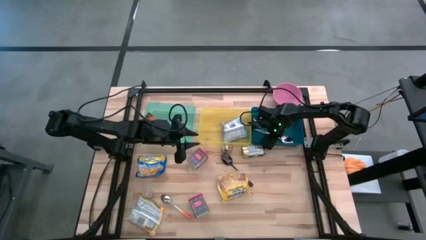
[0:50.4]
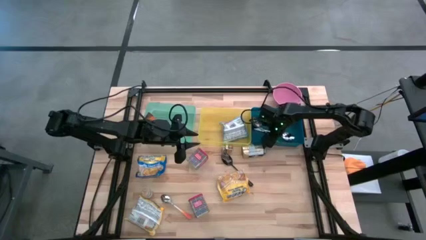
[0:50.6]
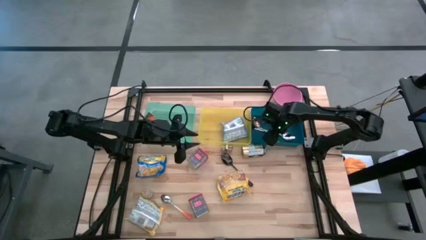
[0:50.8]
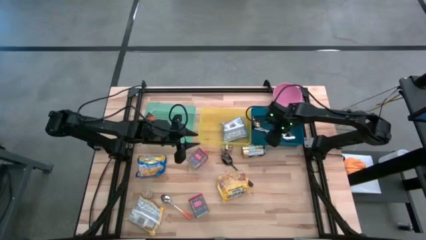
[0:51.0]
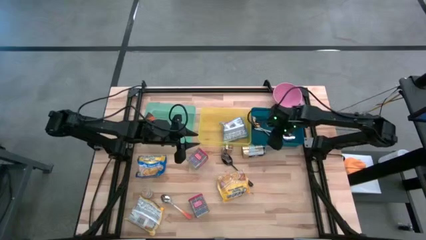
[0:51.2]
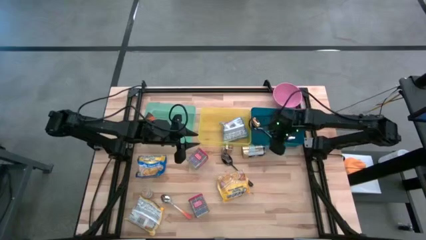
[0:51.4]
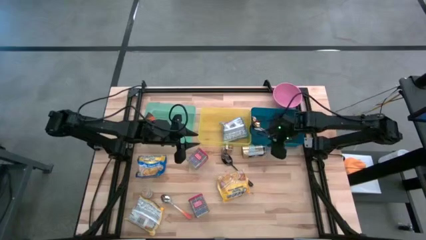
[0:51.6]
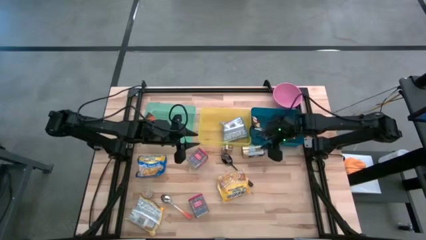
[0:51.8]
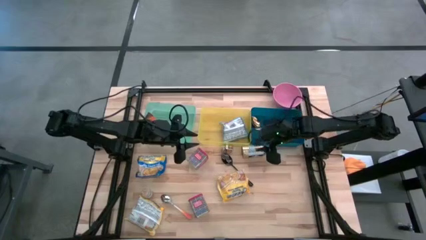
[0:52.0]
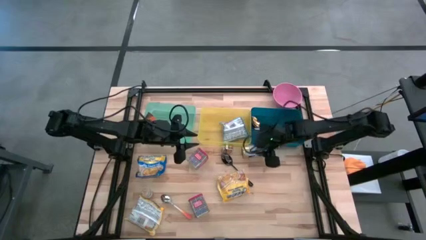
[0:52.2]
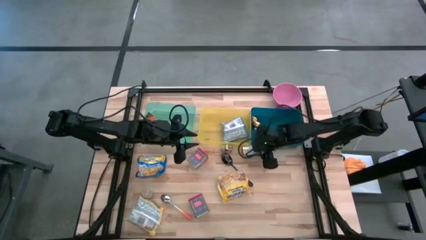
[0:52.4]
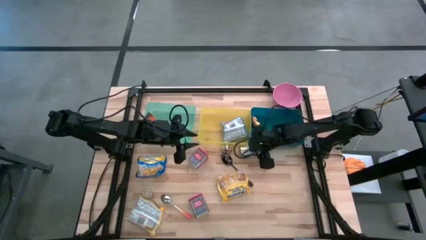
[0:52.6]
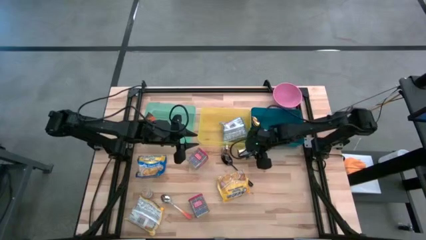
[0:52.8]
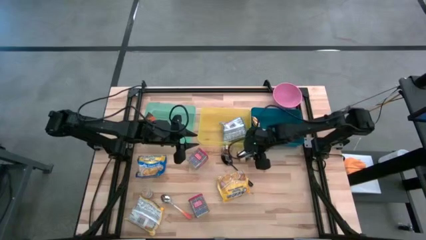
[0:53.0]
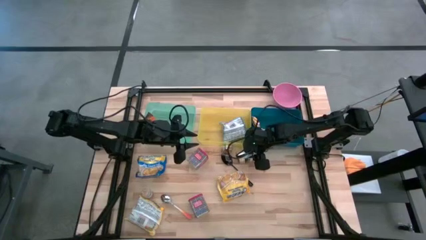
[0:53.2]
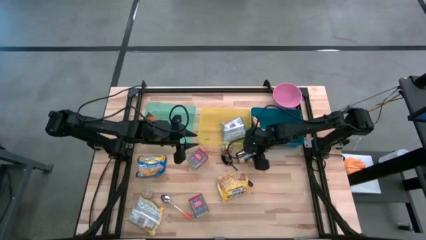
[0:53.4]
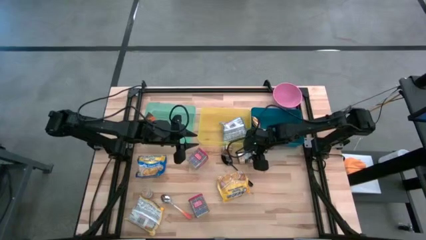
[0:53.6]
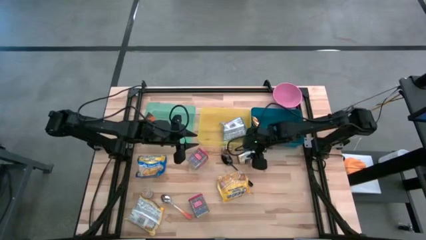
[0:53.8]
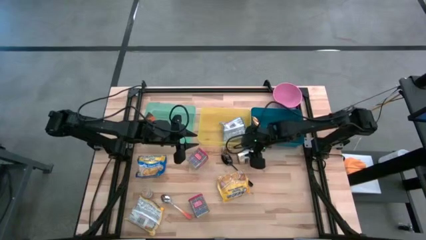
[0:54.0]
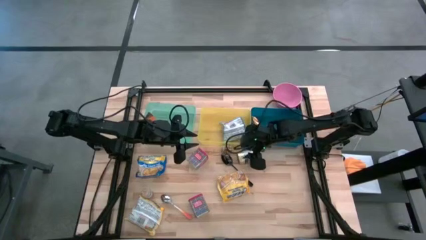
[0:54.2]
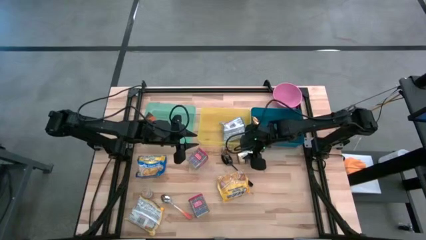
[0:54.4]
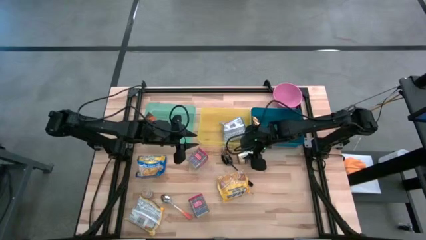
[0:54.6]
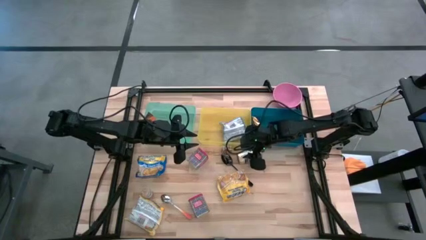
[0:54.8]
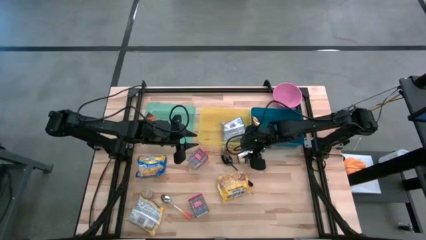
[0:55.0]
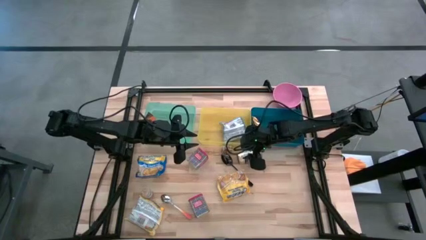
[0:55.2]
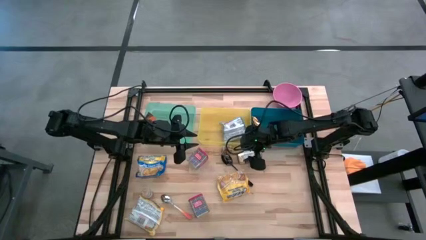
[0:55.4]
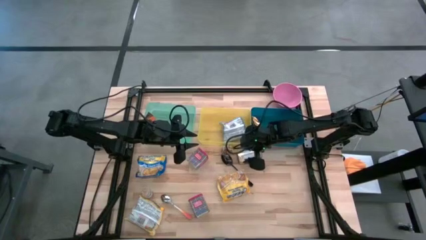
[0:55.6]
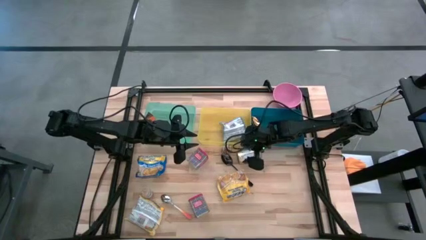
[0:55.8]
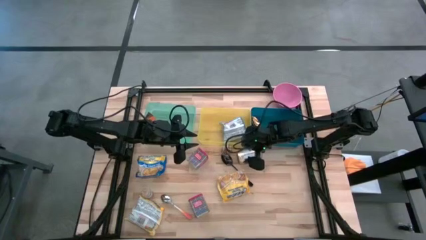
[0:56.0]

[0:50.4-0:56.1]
Put the gold seasoning bottle into the green bin

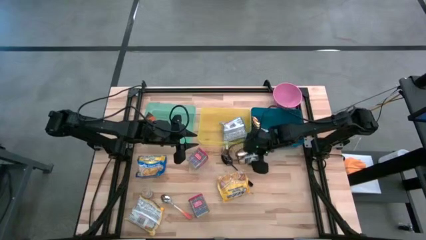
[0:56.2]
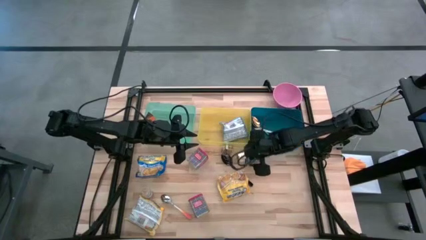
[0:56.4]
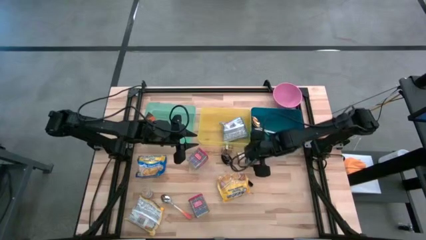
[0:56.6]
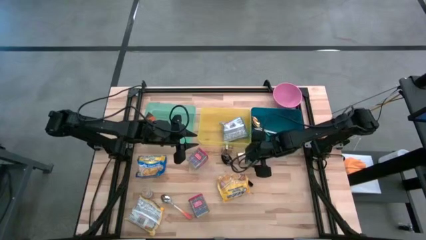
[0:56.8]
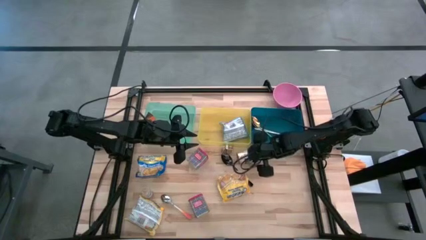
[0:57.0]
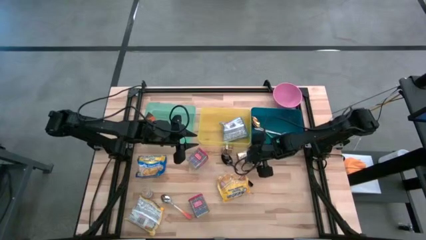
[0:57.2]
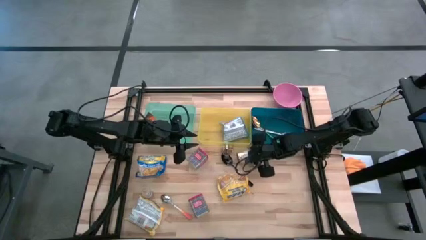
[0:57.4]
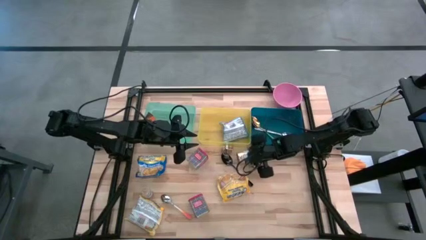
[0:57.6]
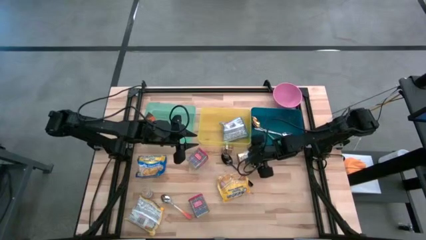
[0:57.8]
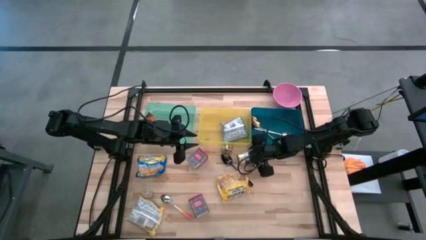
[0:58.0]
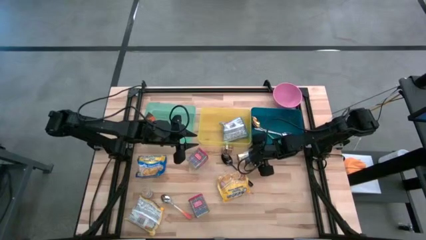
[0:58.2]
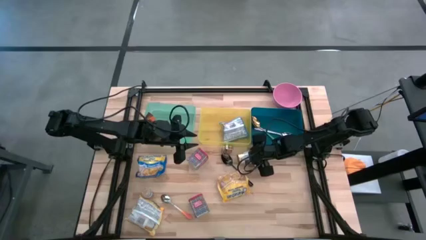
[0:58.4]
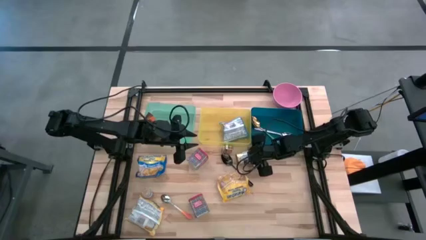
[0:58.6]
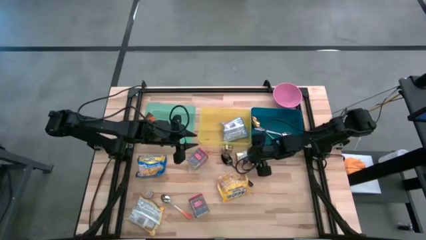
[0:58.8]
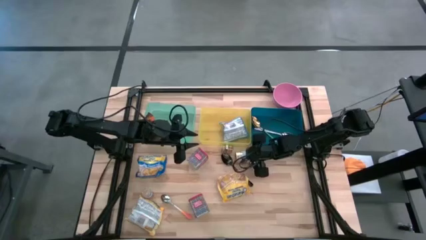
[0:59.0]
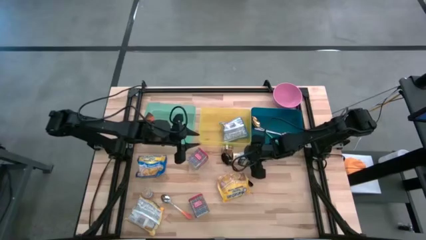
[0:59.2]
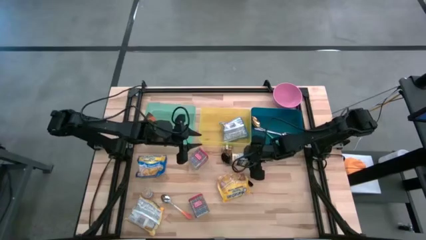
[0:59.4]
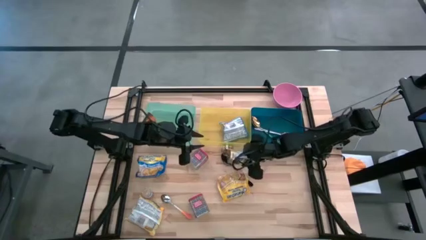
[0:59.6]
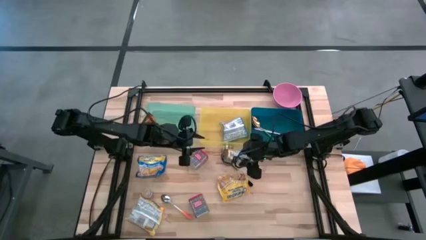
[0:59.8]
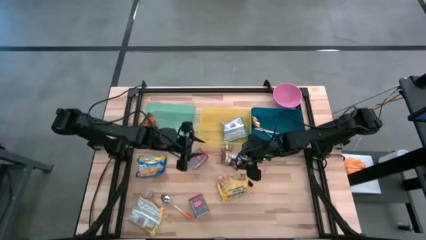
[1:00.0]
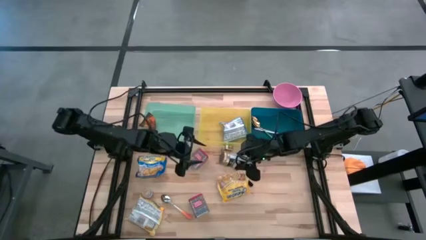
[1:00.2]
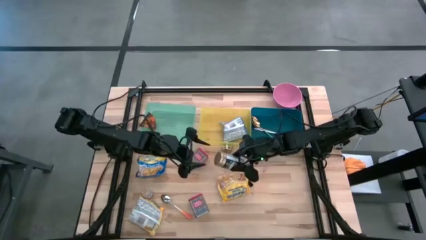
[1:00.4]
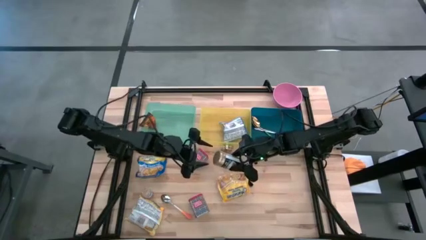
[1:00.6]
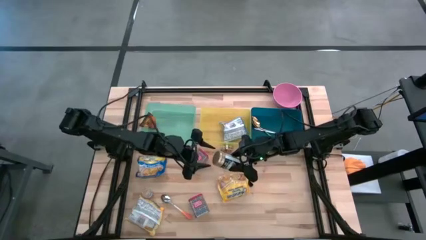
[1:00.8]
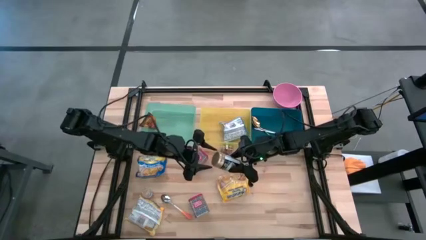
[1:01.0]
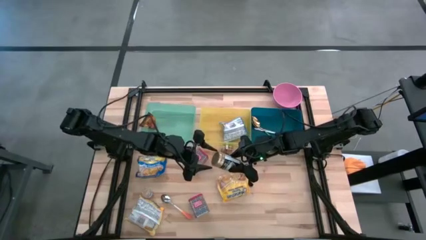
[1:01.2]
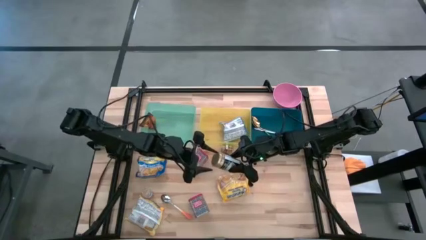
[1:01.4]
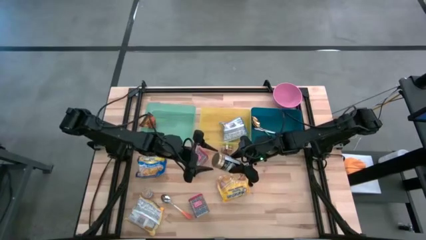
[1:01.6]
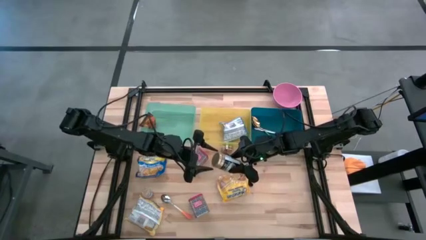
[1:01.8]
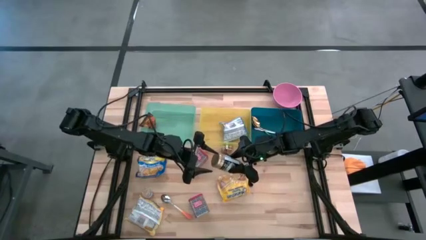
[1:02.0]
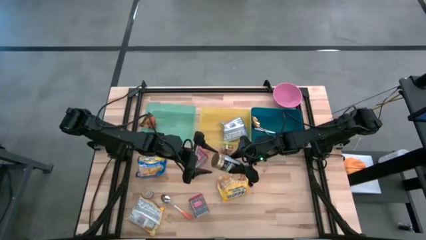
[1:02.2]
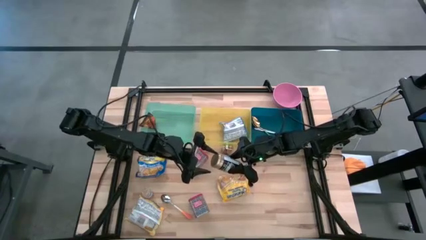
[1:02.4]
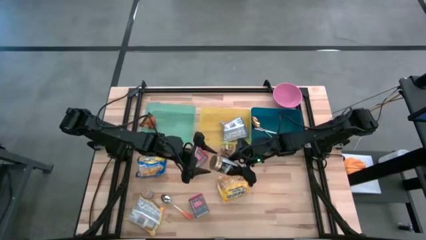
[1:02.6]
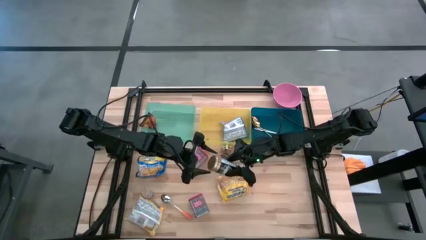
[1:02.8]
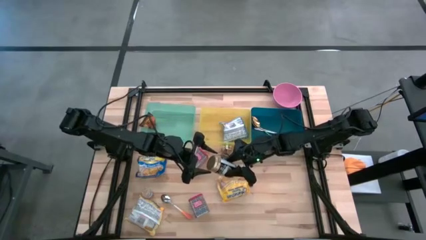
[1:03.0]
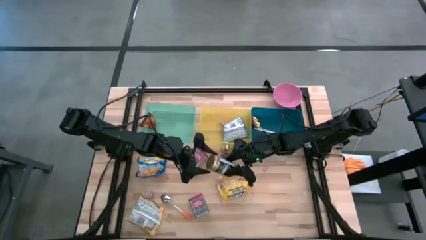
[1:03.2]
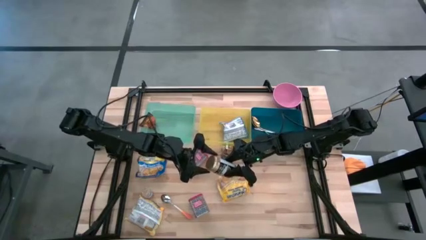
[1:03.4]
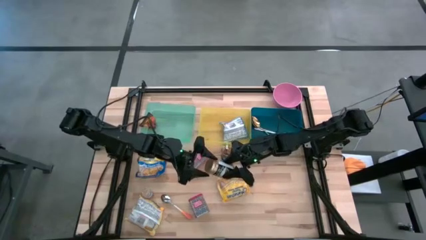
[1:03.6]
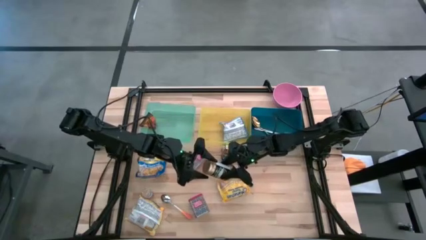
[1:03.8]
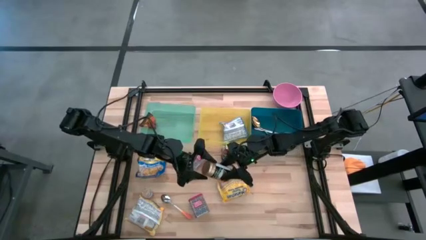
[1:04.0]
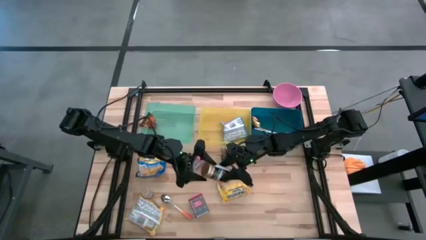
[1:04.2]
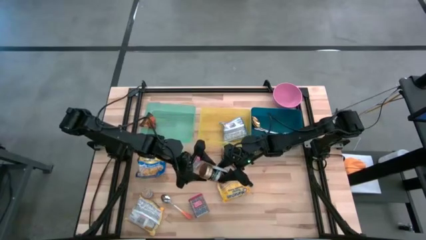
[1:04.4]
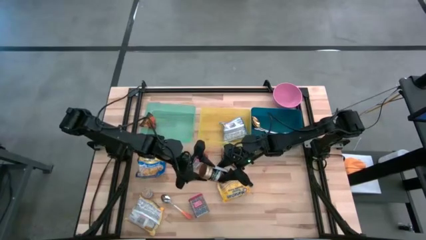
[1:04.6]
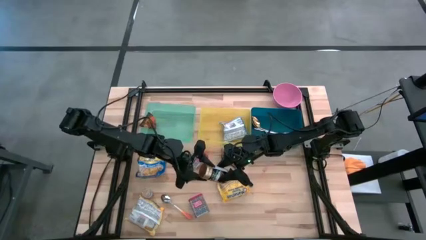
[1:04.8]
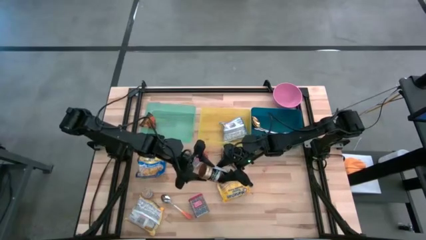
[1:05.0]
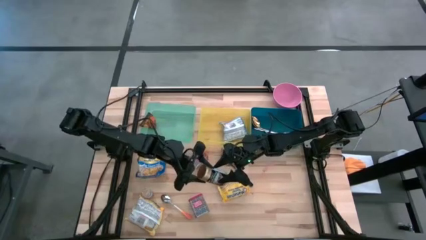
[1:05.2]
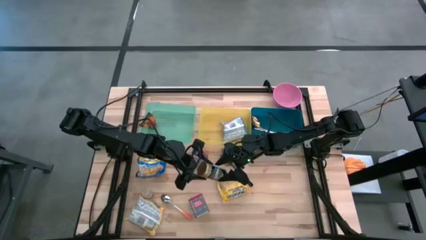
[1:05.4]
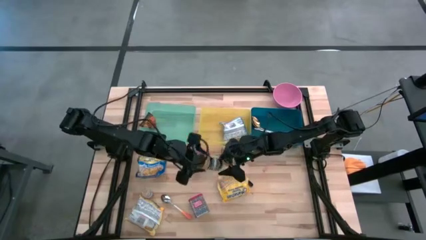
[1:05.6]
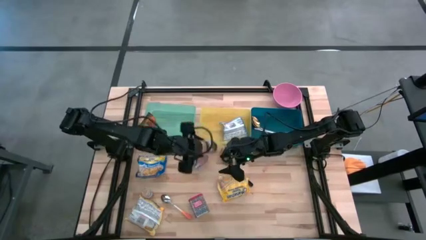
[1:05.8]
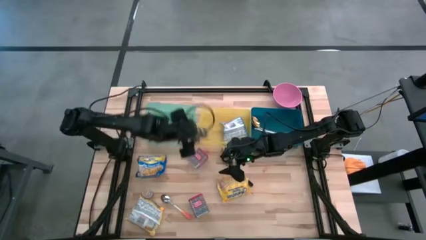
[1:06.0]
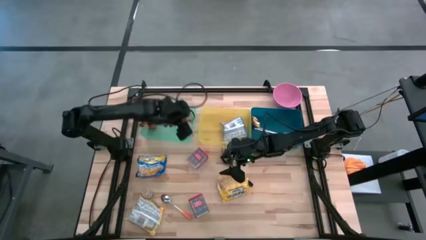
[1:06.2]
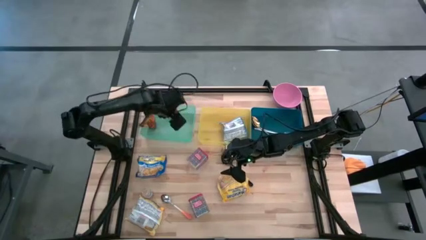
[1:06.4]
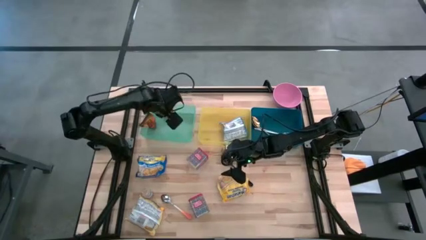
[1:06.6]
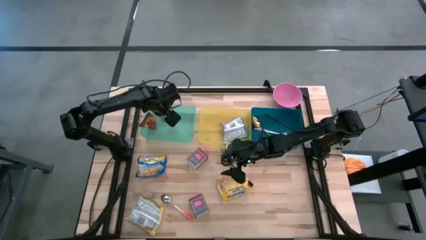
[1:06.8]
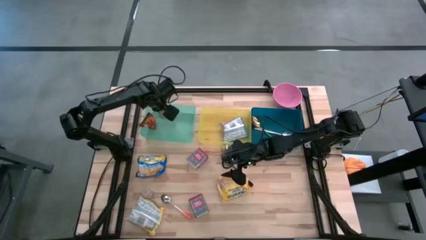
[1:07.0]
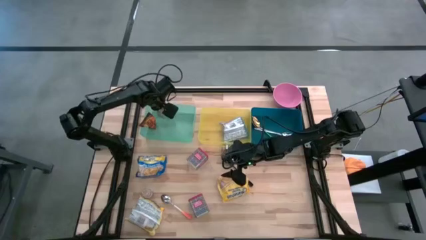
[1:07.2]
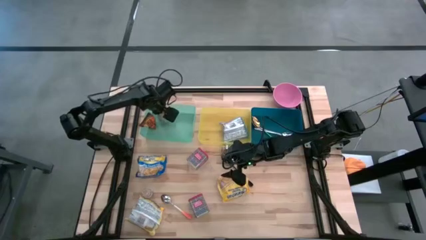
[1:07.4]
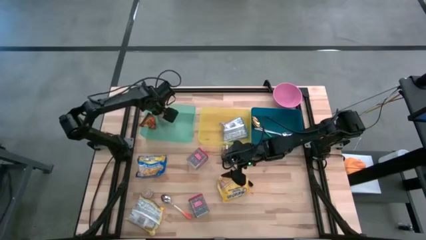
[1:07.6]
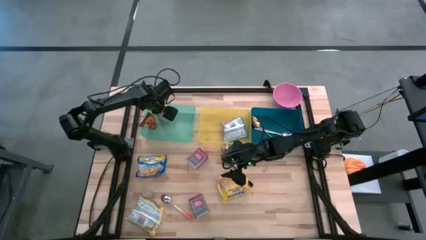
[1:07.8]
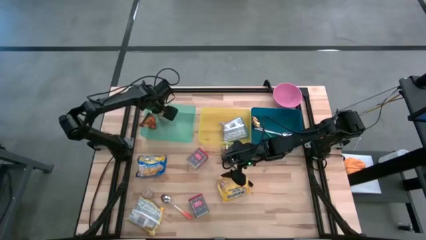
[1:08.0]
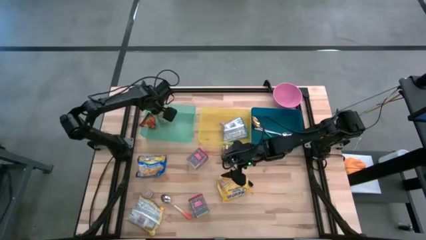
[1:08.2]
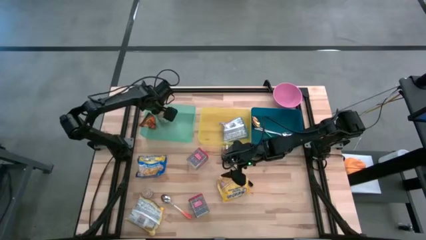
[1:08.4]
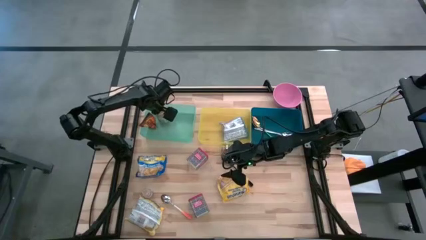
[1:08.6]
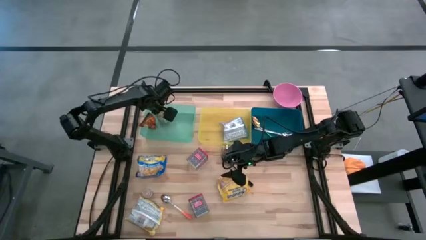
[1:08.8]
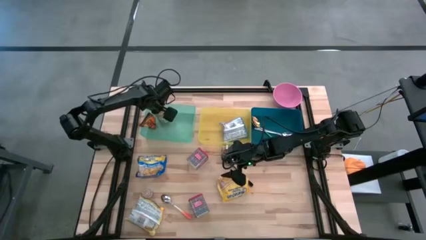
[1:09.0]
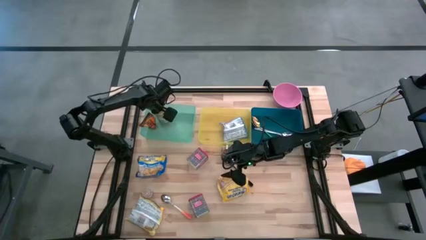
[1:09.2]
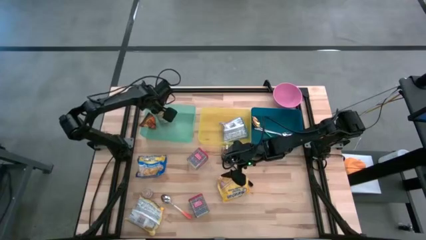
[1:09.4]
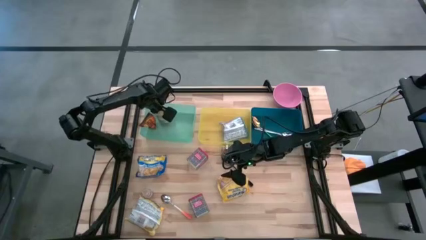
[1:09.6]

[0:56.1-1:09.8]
Put the gold seasoning bottle into the green bin
